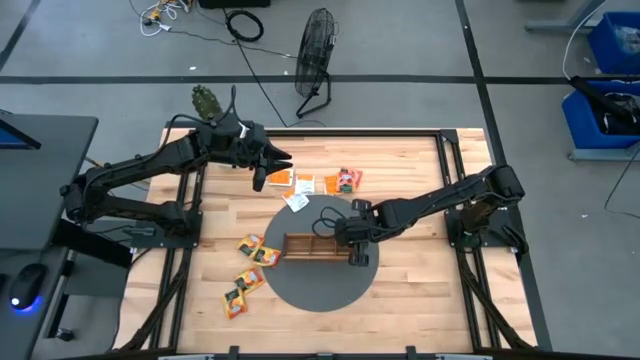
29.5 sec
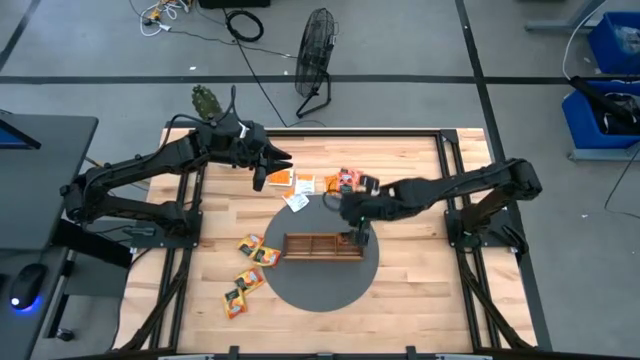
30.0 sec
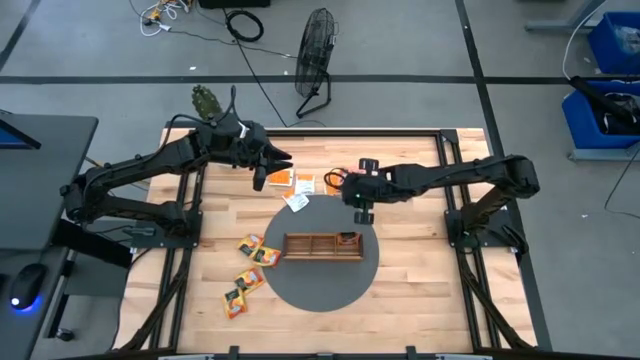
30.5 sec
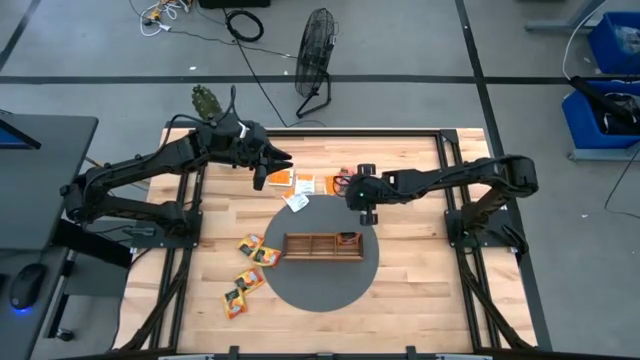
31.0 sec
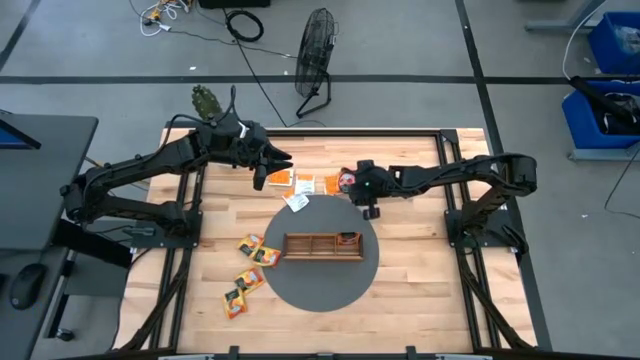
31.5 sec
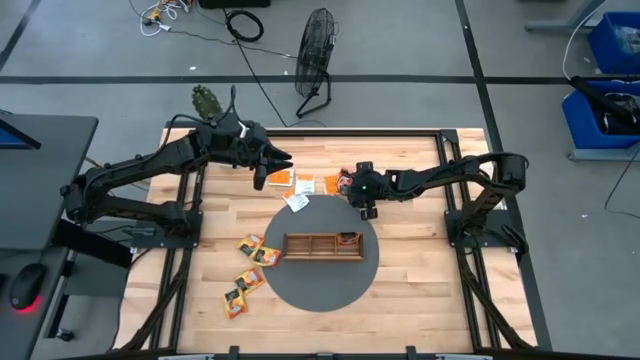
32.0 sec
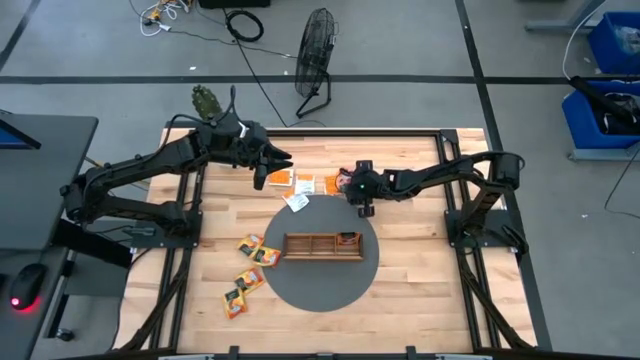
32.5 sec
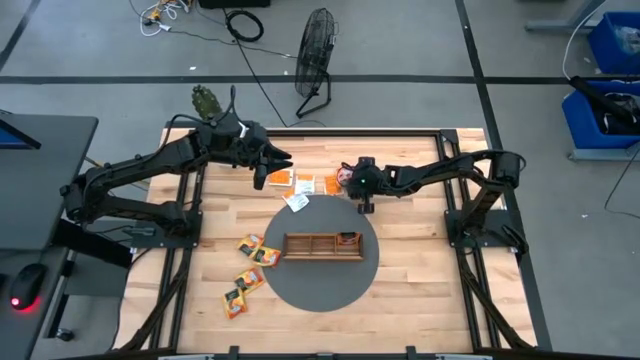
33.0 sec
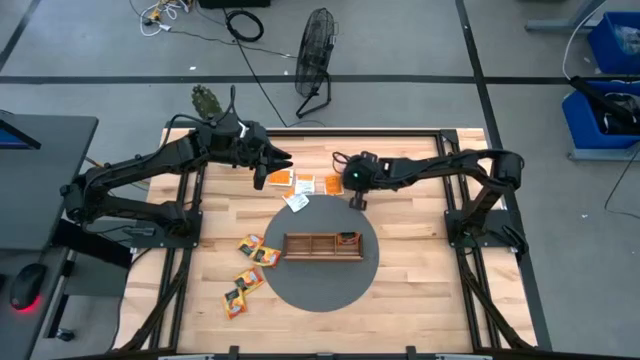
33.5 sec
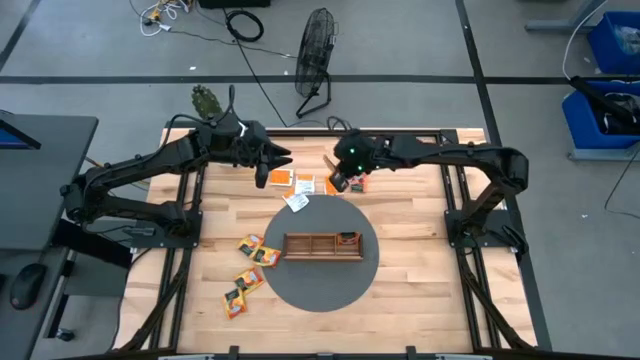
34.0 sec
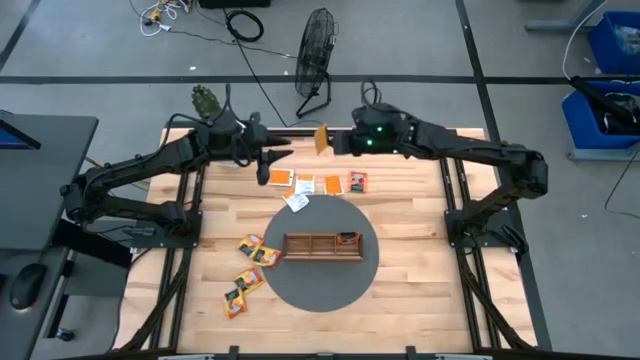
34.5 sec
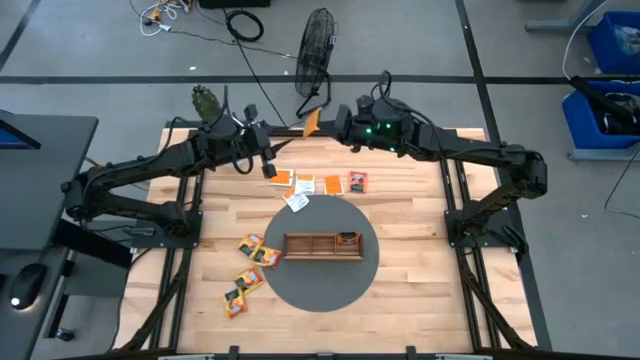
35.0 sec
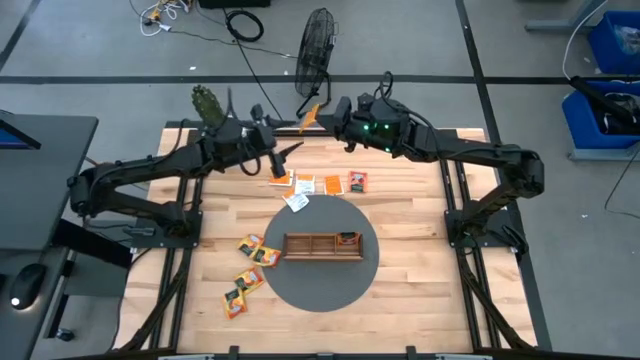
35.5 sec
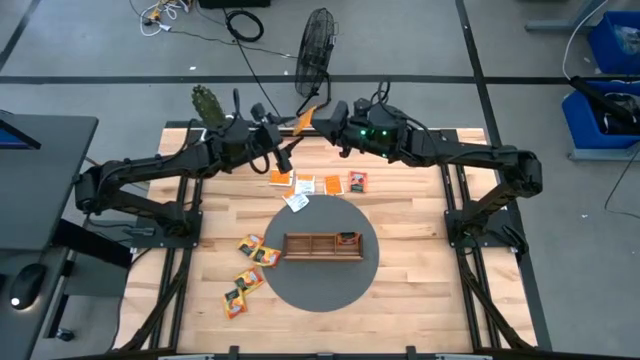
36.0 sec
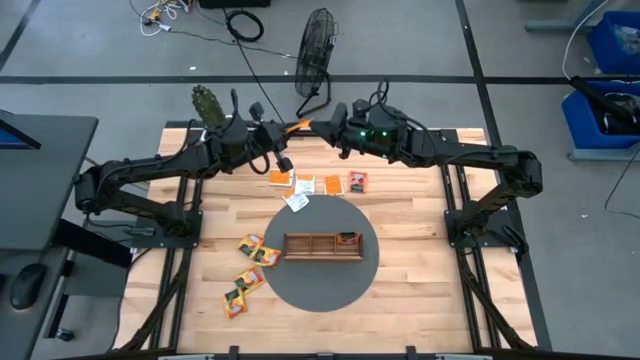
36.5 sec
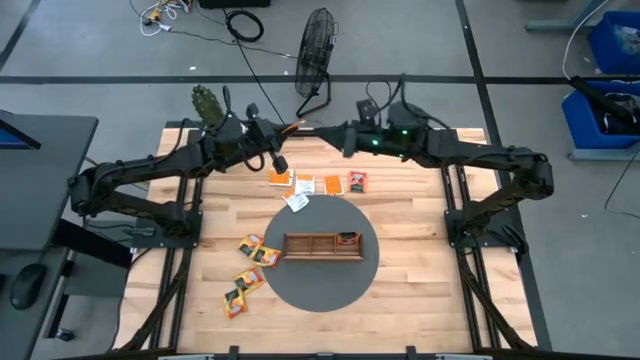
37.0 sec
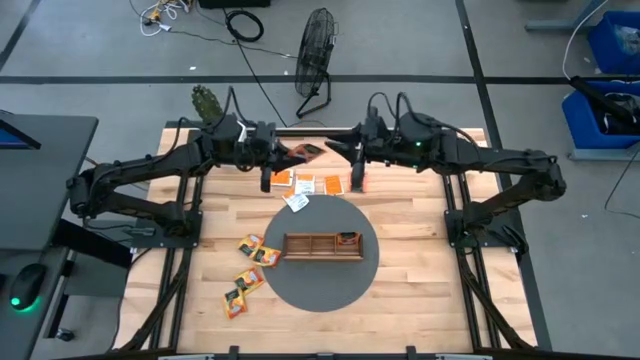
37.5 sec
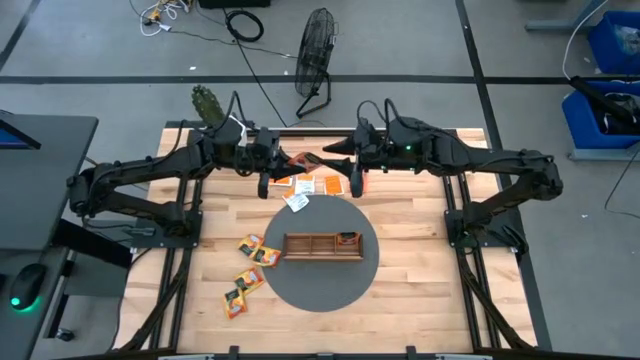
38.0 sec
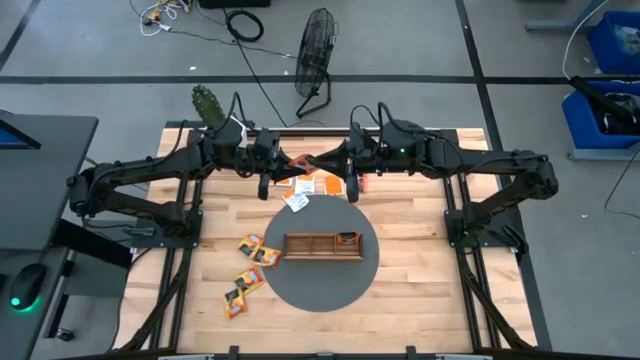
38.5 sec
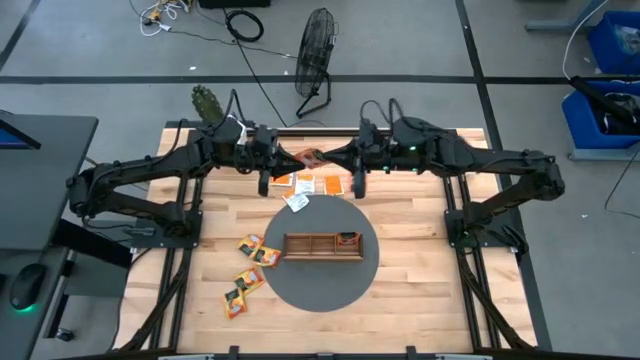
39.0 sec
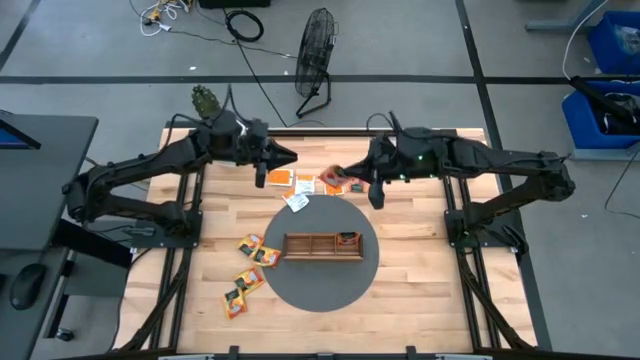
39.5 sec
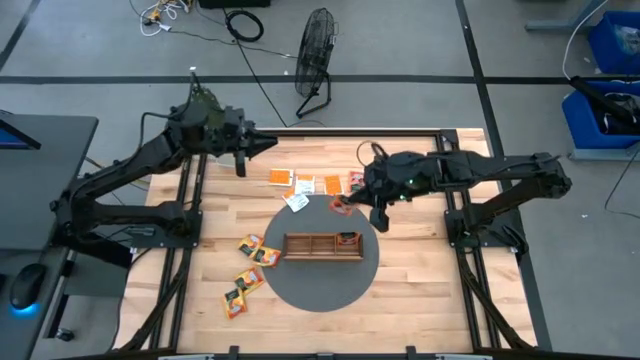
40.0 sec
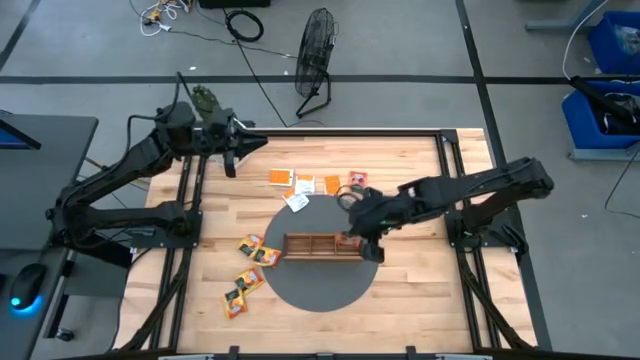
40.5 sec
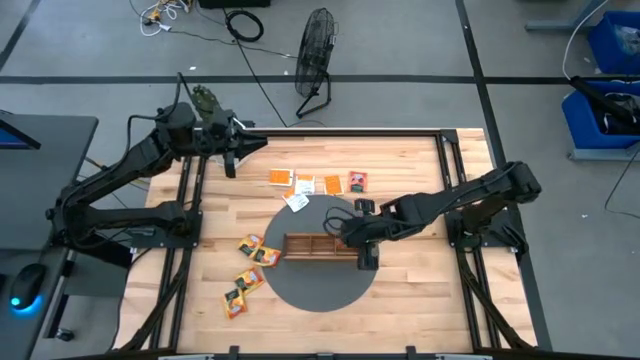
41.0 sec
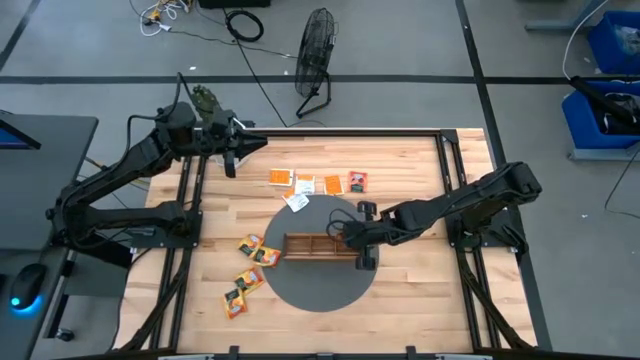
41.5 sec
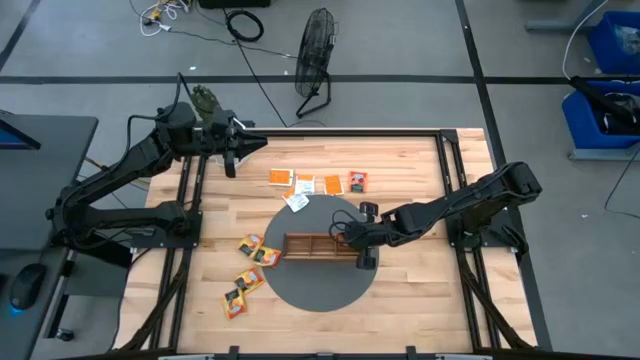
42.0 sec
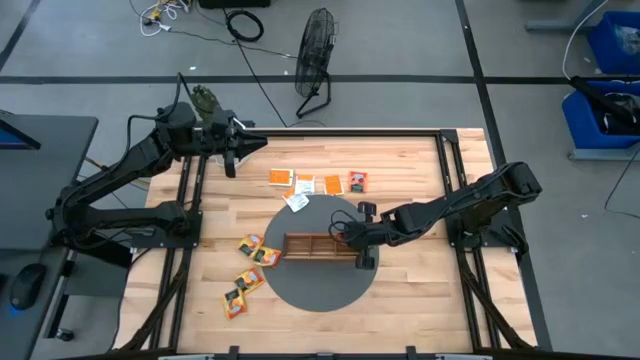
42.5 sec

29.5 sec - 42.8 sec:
Task: Pick & Place Tea
Put the red tea bag into the right section of the wooden organizer

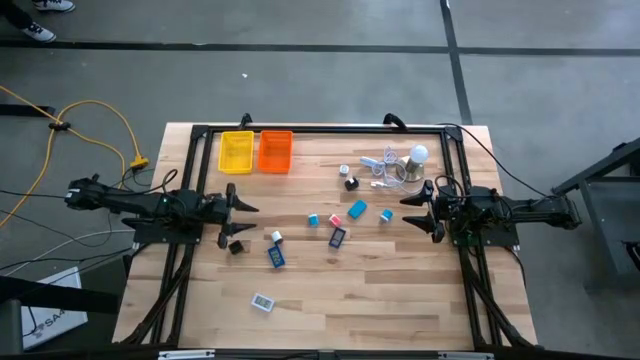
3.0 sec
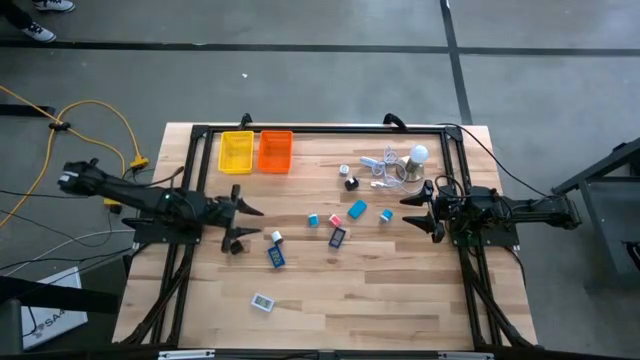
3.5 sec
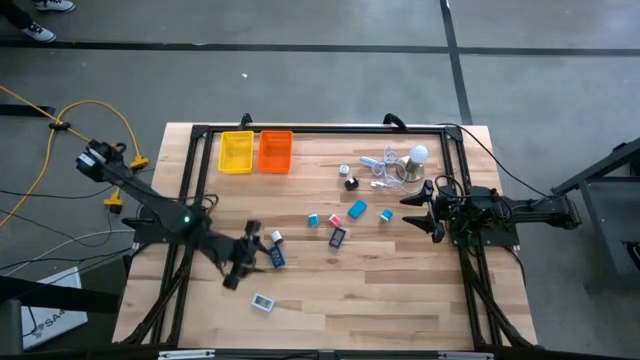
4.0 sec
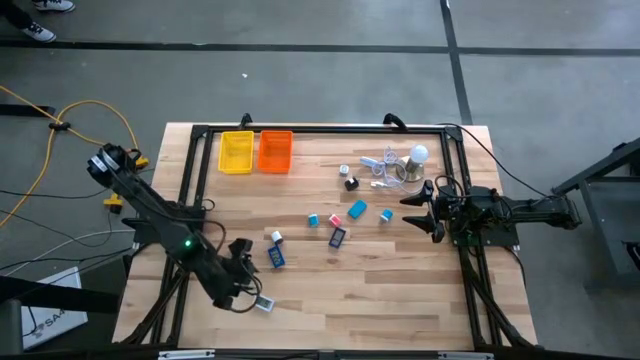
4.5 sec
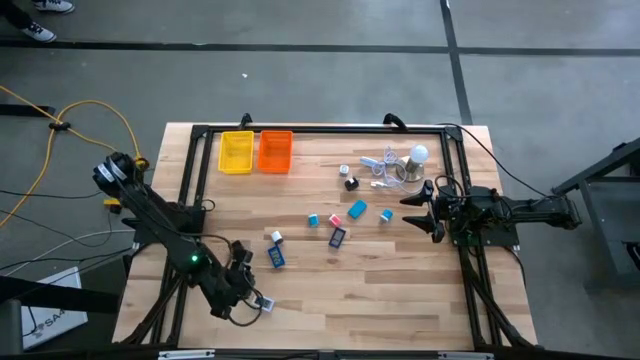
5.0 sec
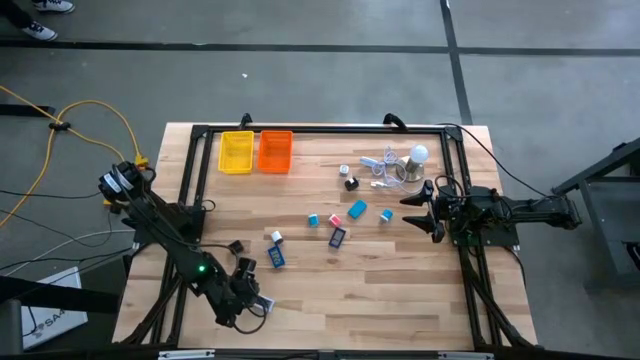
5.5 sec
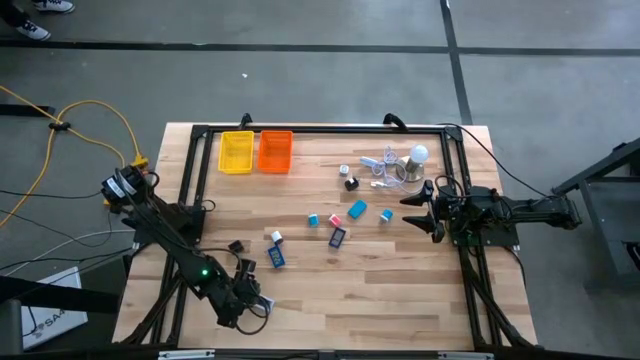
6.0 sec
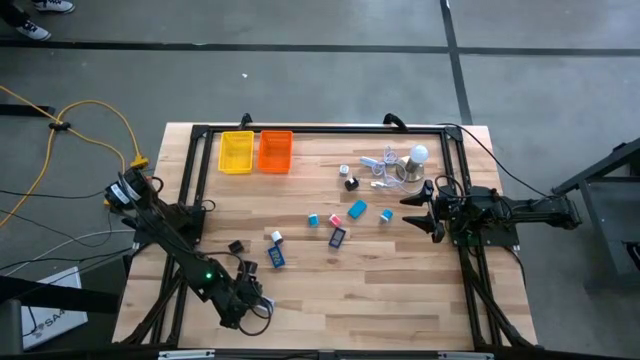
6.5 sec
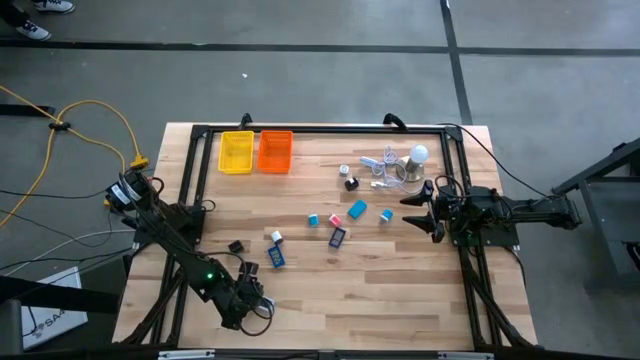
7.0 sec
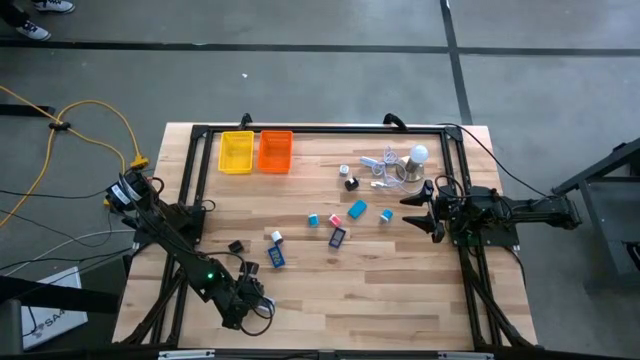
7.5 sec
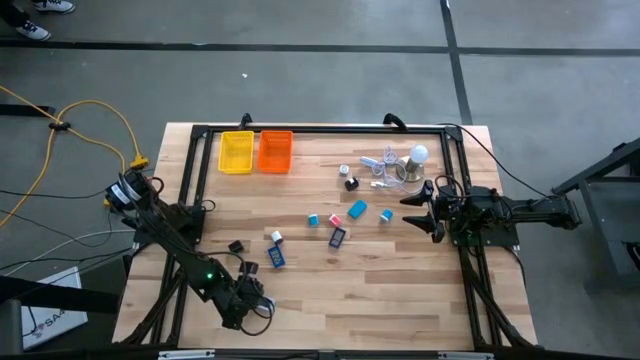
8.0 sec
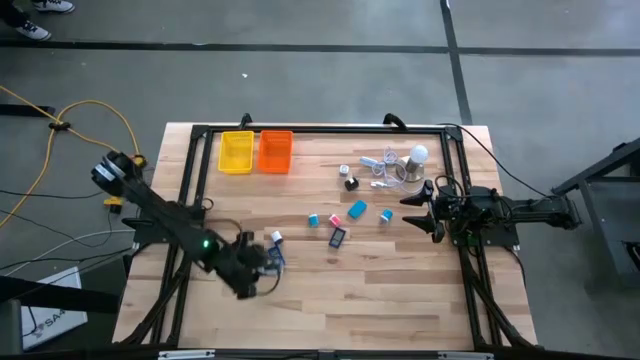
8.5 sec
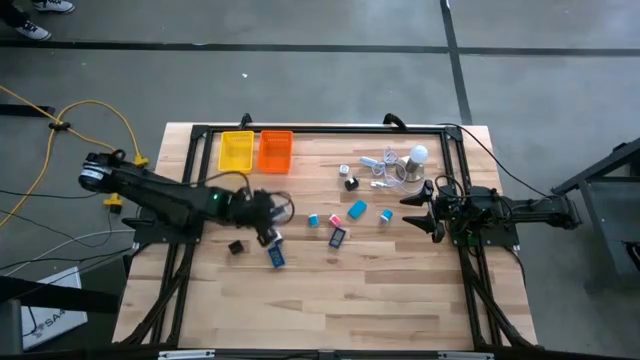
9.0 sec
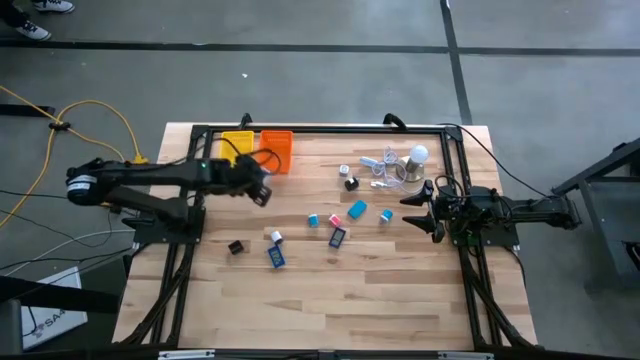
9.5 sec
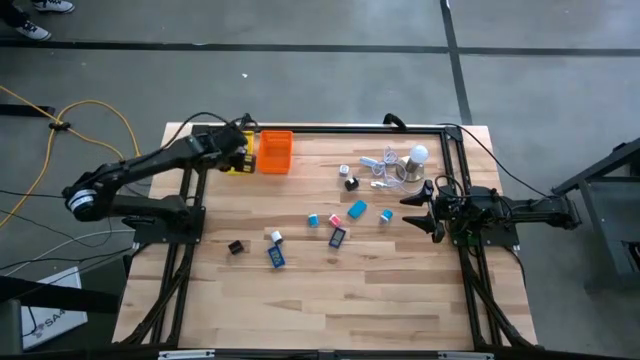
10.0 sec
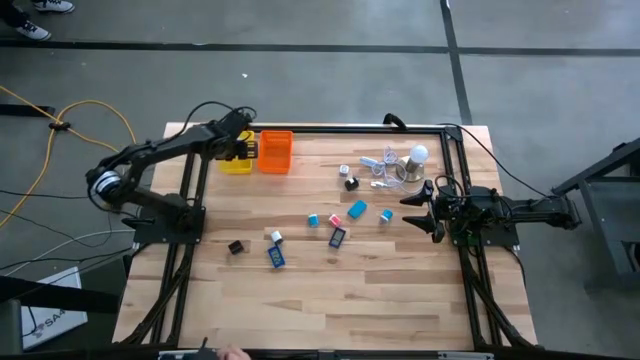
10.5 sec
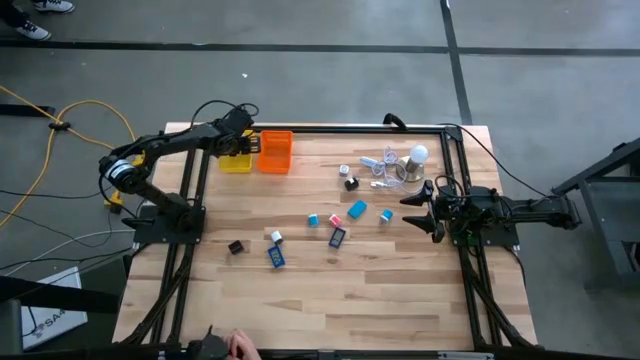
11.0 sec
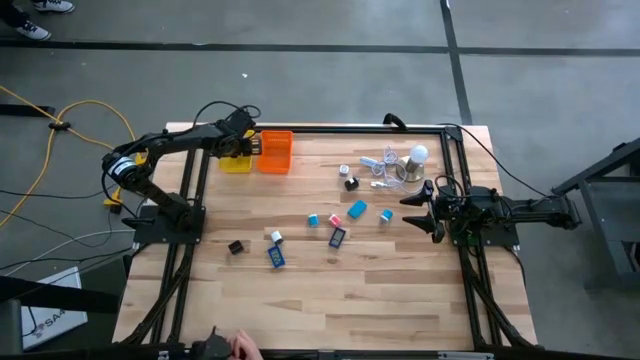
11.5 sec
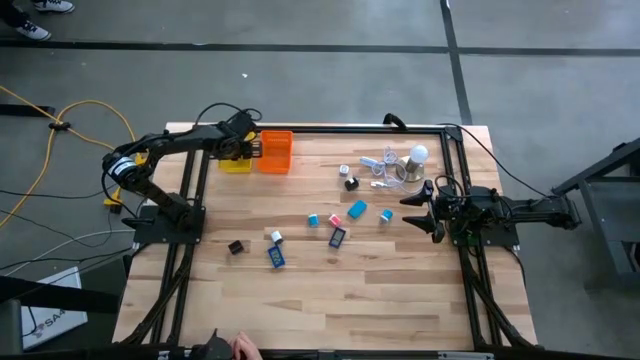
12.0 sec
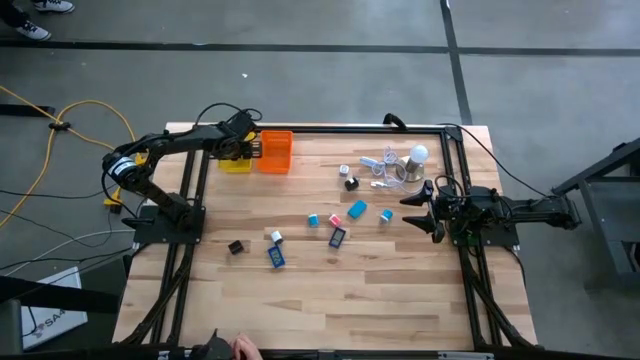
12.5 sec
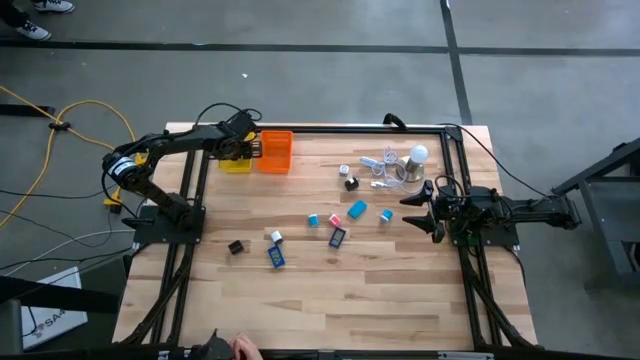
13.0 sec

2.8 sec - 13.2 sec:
Task: Pick & Place Office items
Put the white digital clock into the yellow basket
